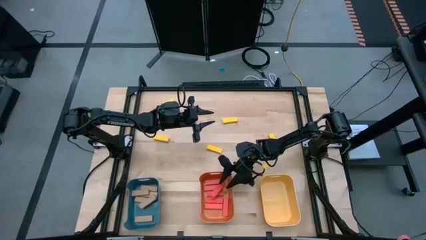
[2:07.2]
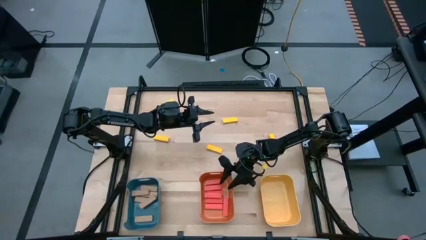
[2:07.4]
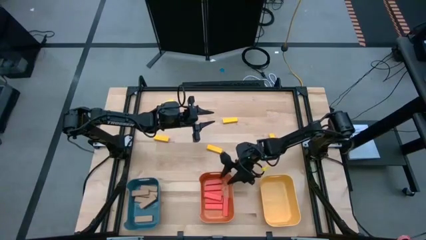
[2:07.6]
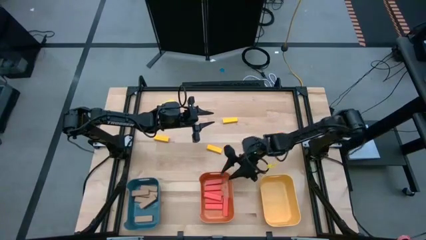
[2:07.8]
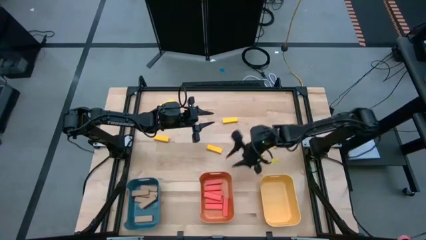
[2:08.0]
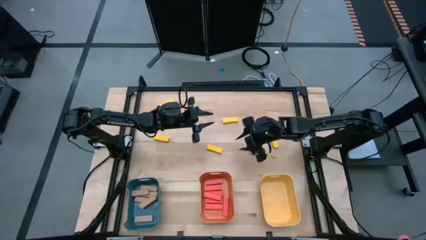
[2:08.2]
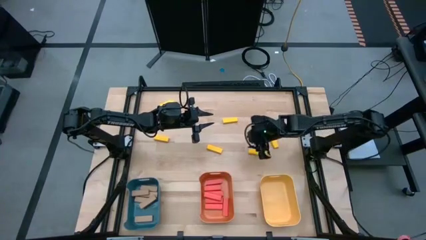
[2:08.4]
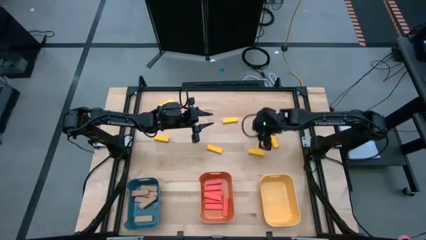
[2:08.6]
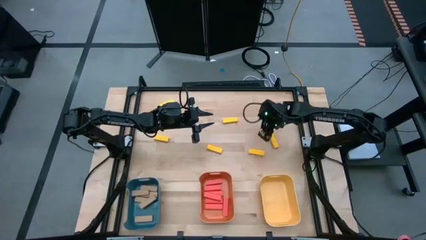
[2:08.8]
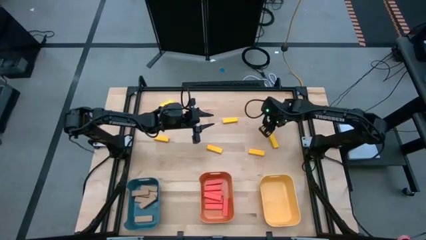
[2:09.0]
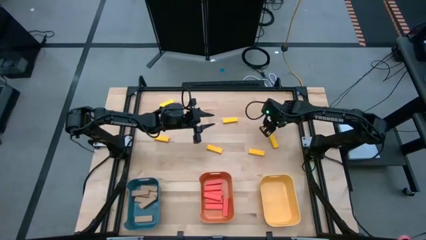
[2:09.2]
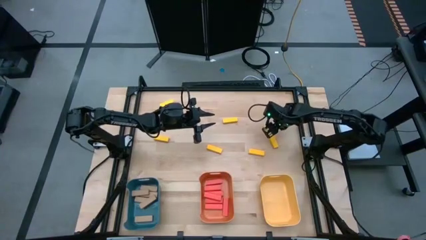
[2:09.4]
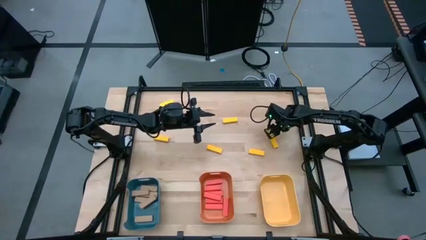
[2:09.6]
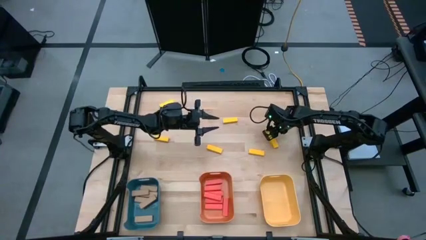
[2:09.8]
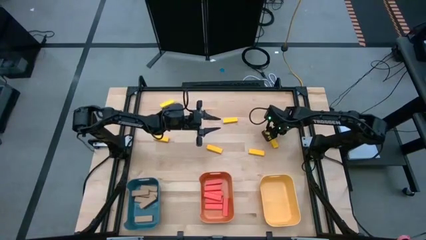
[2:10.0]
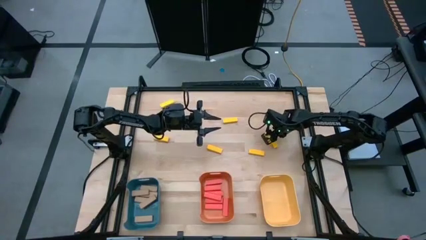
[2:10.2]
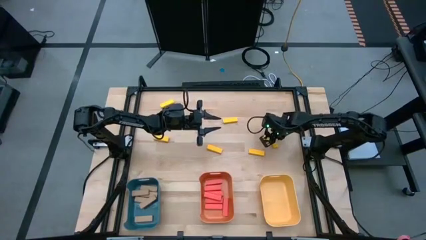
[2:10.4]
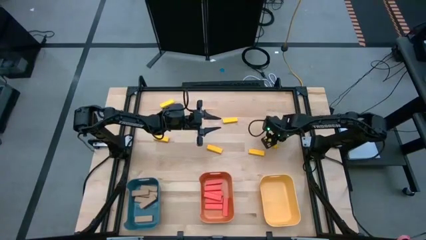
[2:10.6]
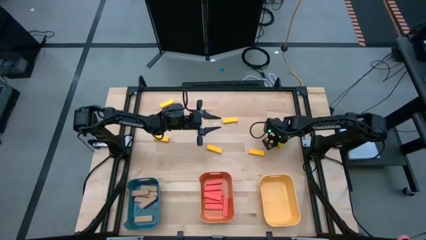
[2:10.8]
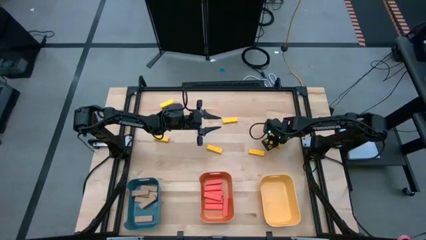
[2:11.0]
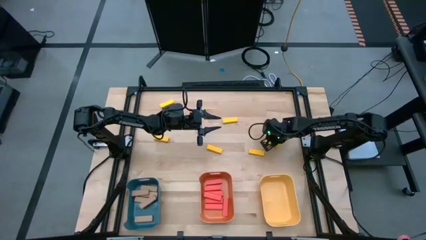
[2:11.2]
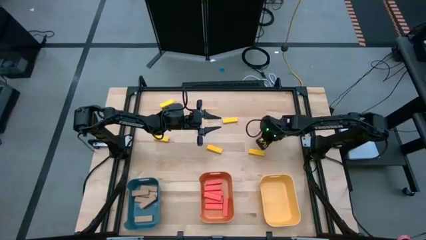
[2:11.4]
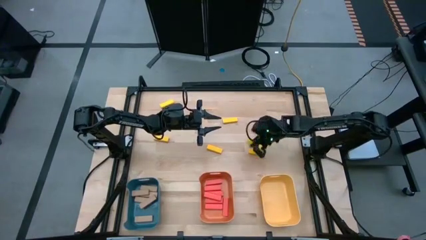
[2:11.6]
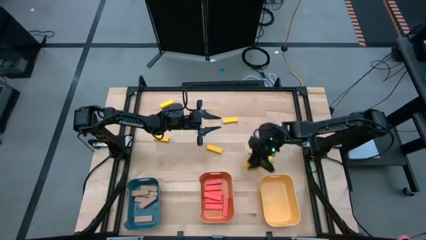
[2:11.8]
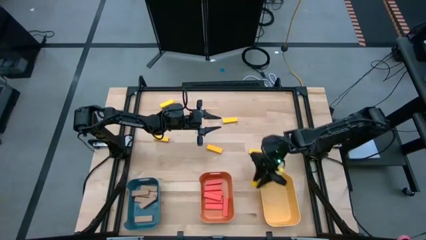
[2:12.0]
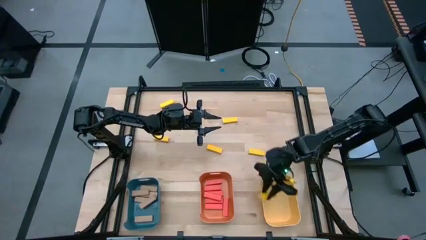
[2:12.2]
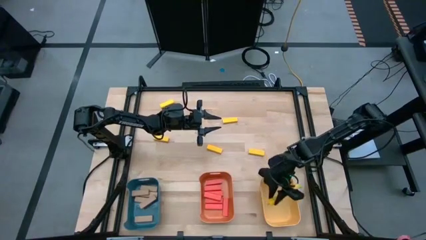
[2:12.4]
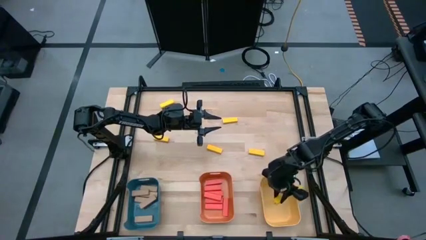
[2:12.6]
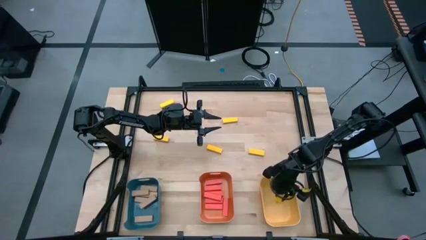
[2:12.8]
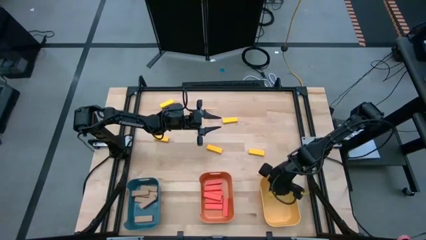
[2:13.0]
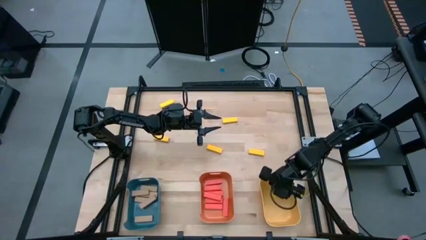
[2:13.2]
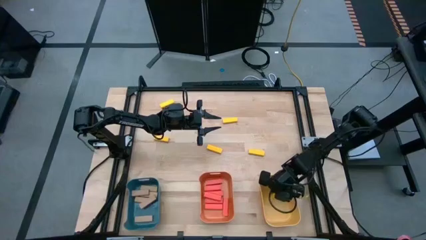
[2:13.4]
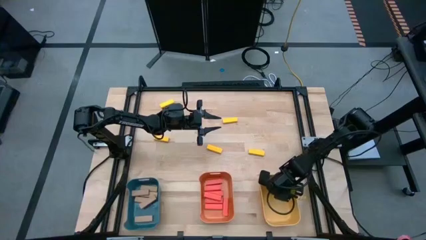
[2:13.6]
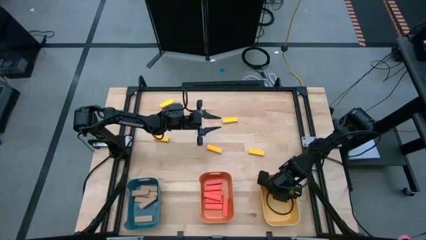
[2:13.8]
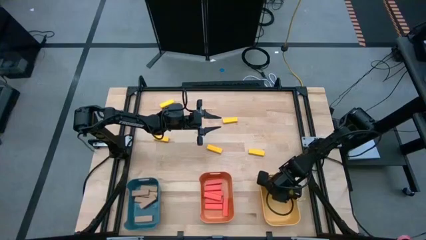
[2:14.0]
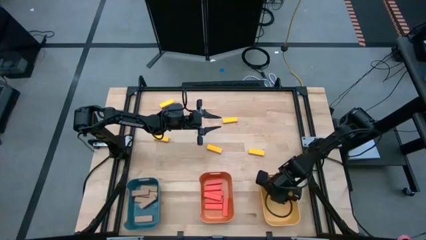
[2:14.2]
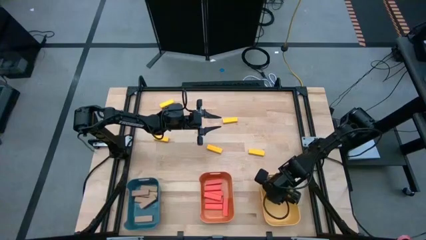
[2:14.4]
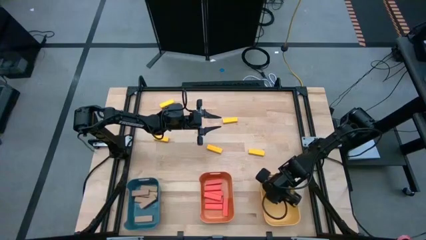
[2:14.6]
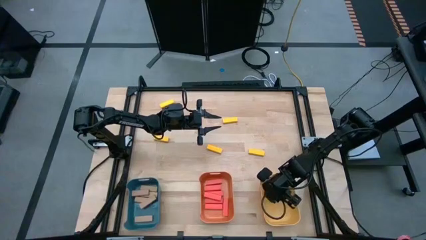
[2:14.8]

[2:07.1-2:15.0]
Task: Sort blocks
Put the top right yellow block into the yellow bin

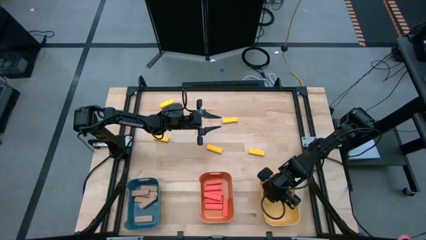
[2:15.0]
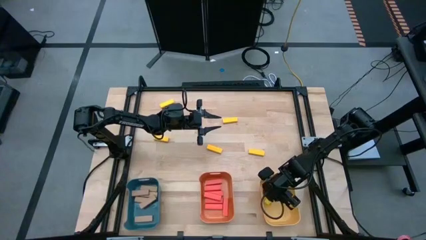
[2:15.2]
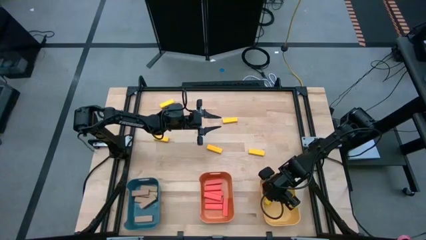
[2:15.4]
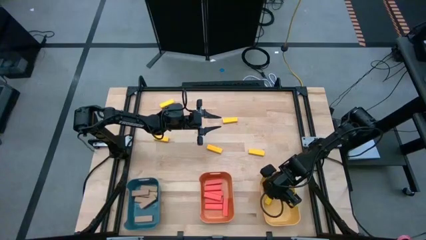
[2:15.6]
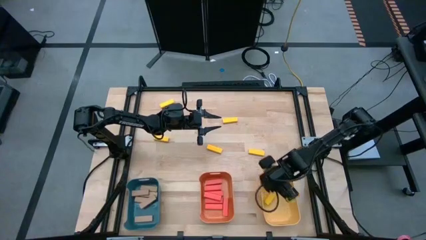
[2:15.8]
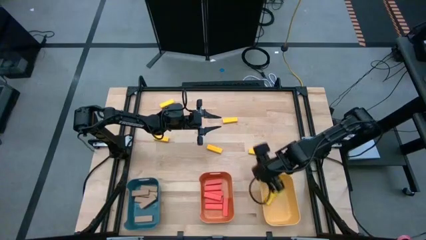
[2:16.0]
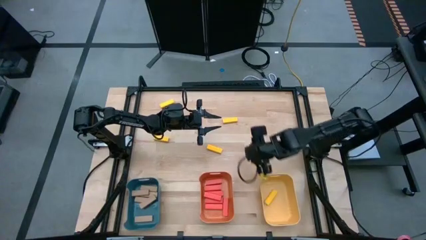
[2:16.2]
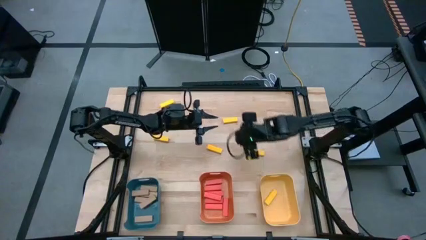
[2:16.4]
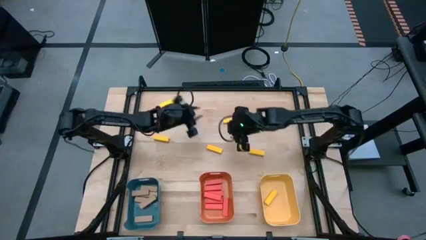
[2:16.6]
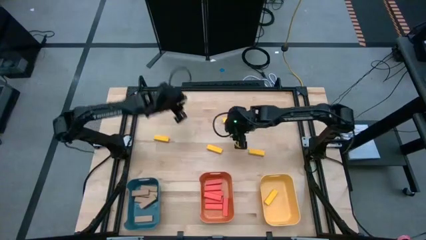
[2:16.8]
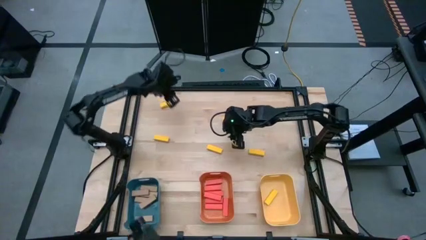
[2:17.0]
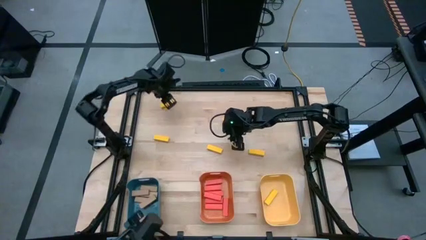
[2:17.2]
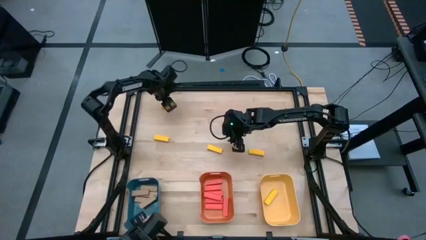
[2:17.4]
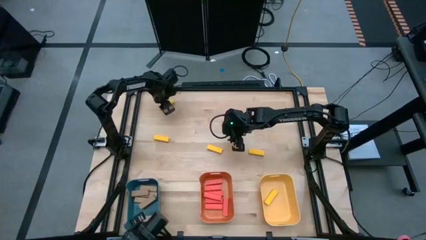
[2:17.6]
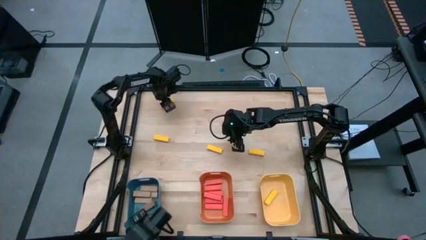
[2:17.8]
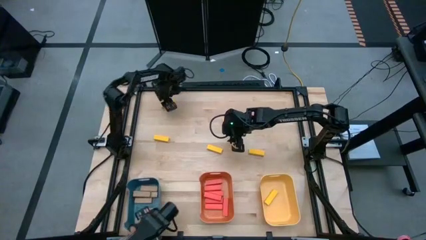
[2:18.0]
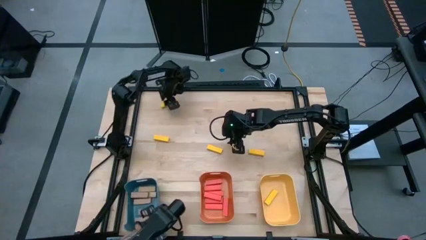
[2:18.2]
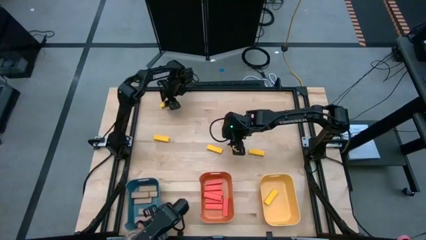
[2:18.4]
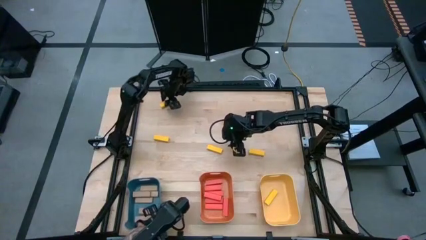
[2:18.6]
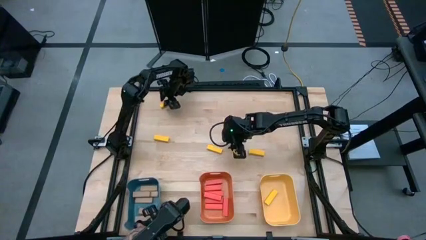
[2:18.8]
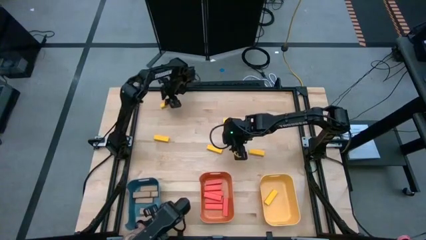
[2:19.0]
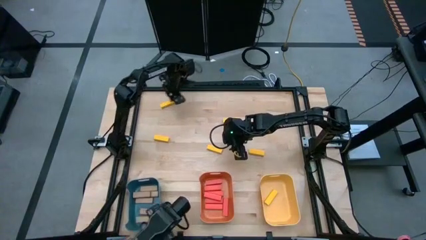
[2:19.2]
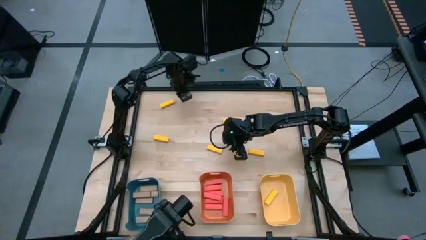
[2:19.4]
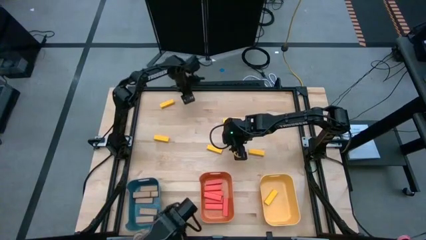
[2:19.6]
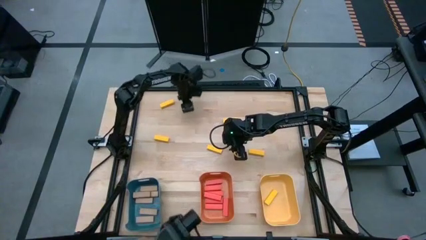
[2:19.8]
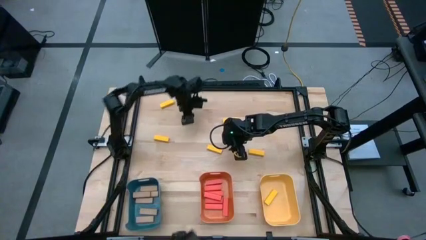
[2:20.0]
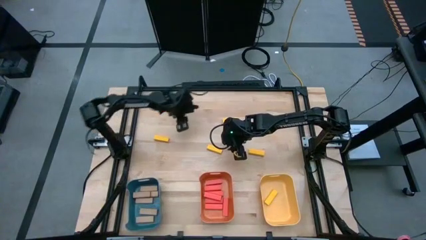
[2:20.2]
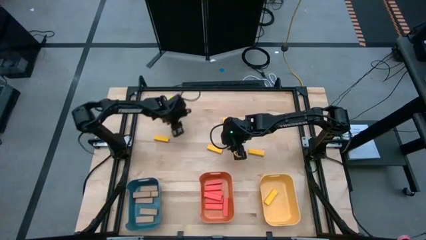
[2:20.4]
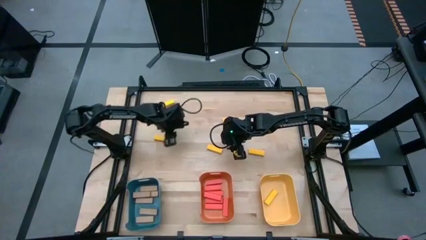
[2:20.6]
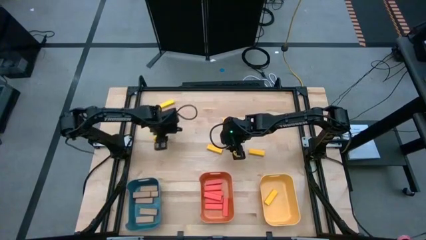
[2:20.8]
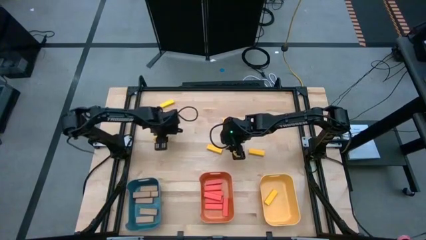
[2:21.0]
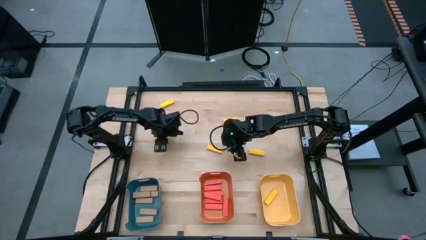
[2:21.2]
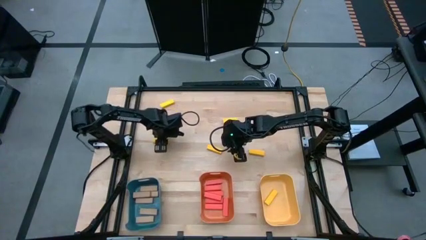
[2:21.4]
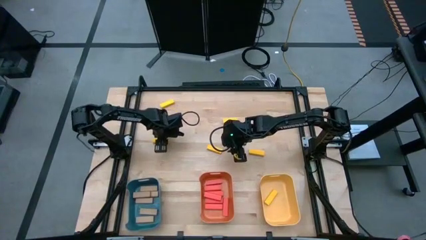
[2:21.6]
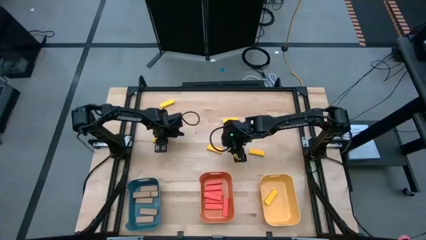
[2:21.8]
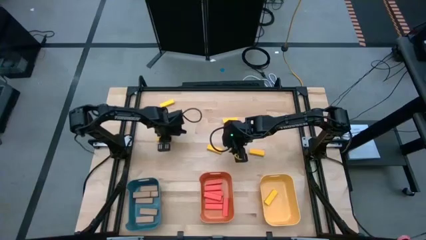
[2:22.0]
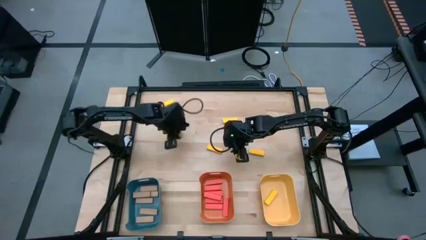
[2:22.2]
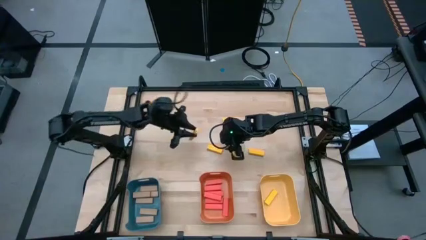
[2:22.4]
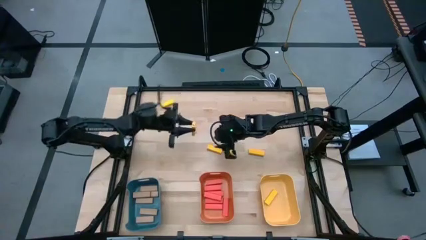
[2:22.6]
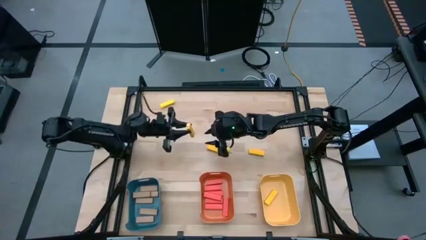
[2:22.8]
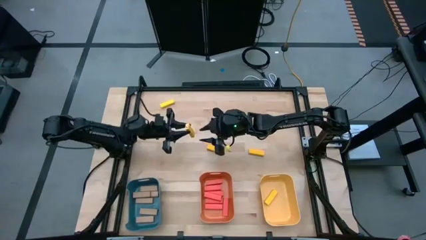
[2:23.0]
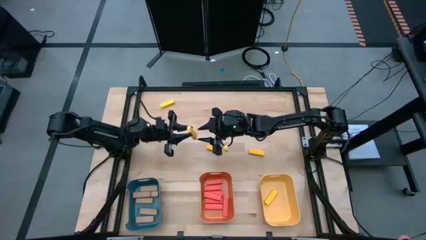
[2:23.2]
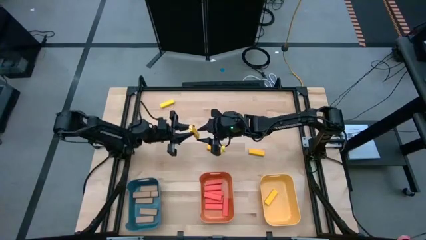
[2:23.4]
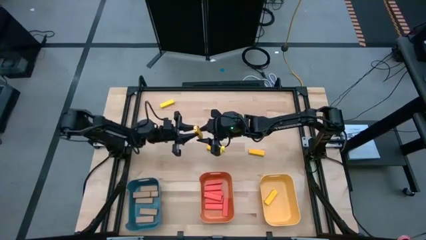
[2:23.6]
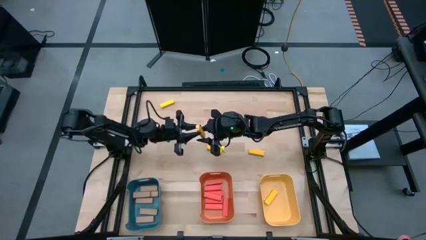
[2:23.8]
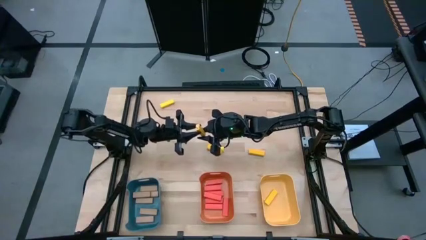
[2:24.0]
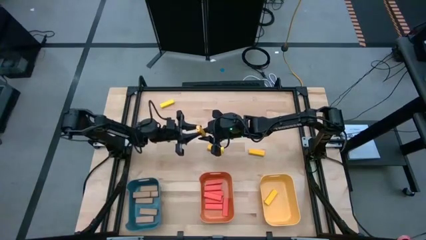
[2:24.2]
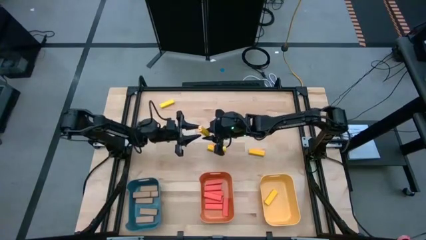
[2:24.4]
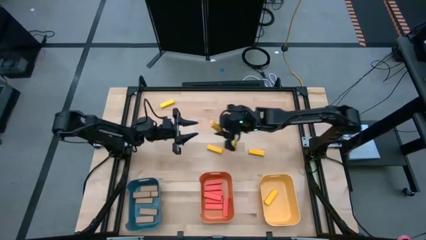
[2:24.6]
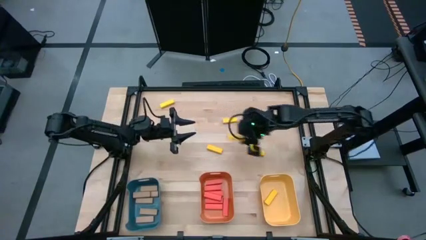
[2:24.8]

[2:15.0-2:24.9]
Put the bottom left yellow block into the yellow bin
